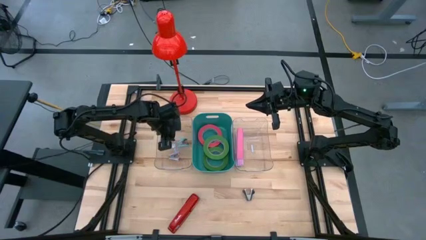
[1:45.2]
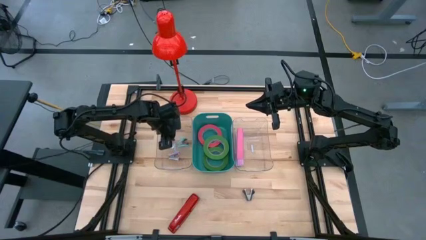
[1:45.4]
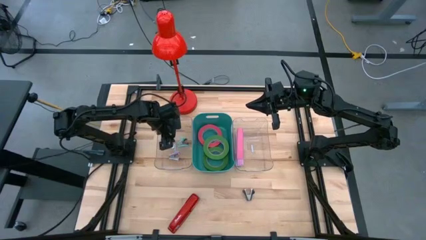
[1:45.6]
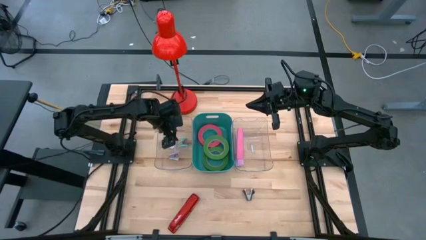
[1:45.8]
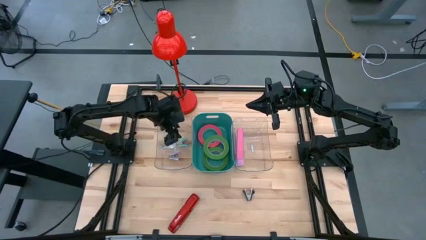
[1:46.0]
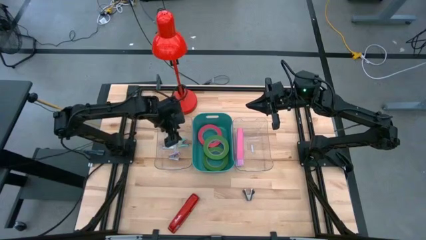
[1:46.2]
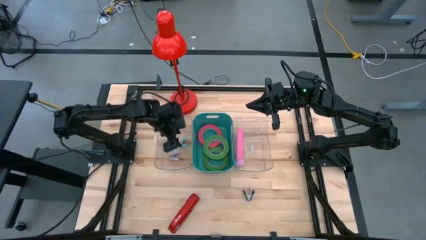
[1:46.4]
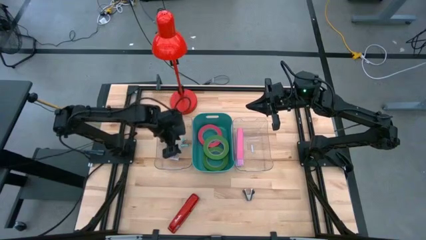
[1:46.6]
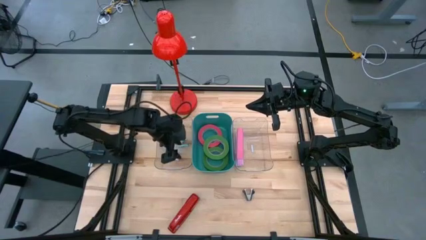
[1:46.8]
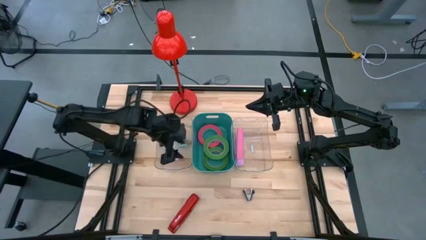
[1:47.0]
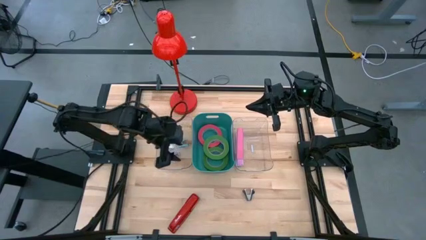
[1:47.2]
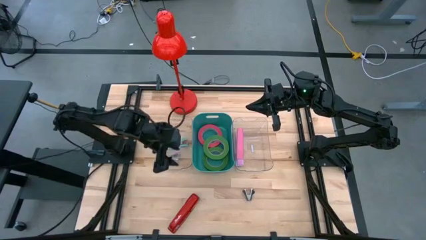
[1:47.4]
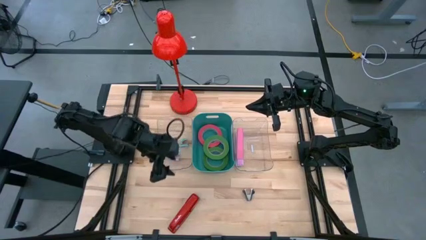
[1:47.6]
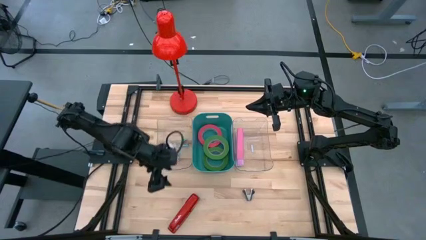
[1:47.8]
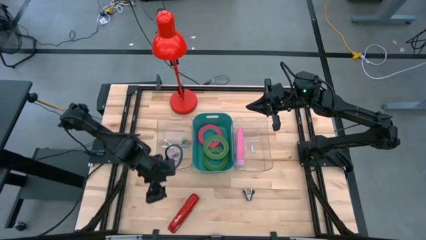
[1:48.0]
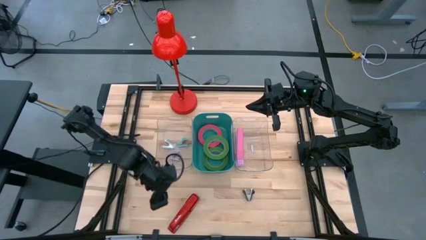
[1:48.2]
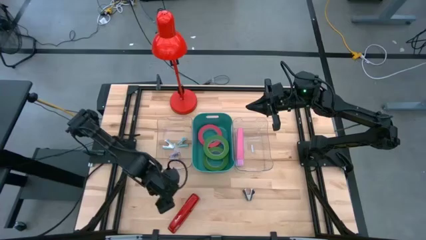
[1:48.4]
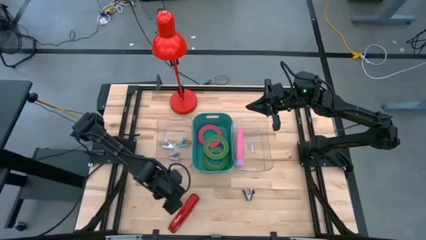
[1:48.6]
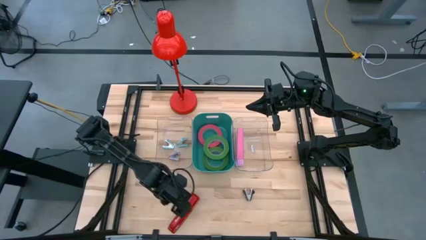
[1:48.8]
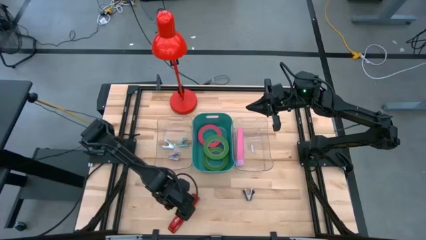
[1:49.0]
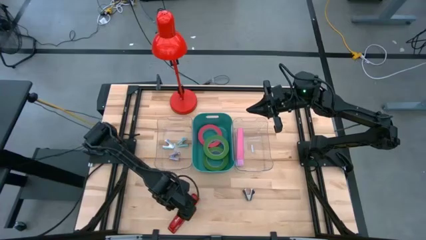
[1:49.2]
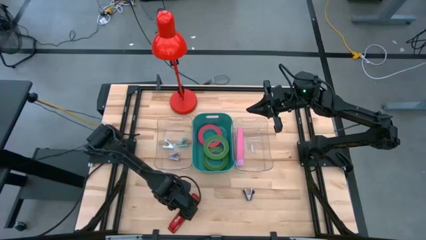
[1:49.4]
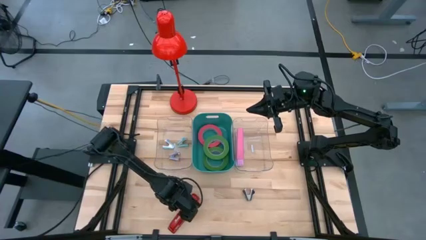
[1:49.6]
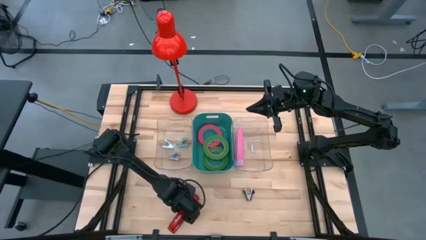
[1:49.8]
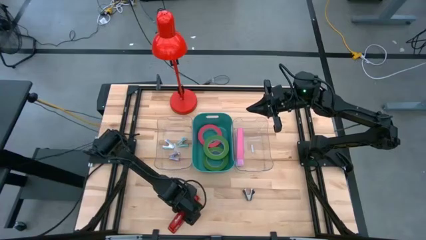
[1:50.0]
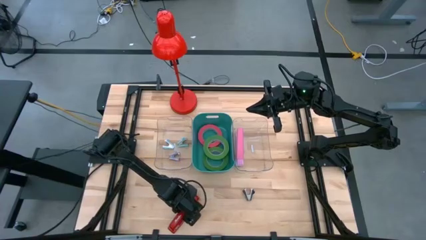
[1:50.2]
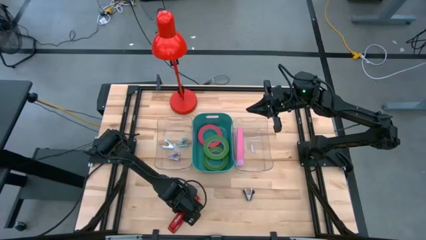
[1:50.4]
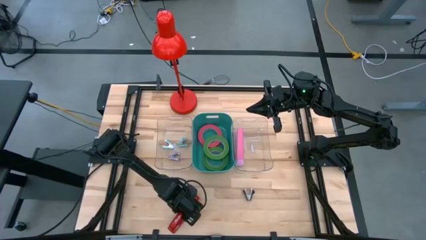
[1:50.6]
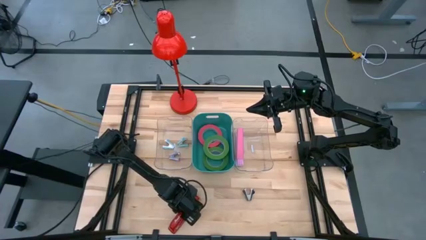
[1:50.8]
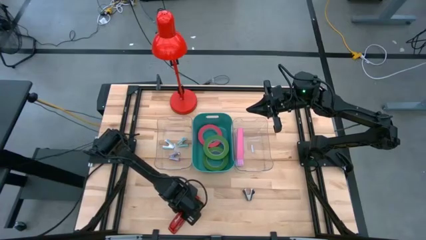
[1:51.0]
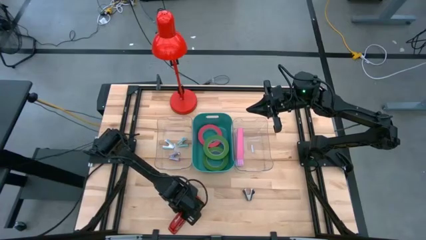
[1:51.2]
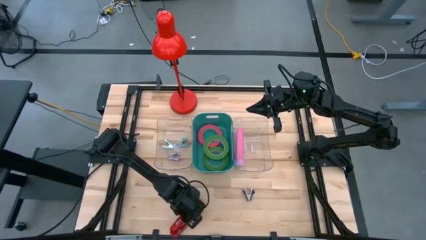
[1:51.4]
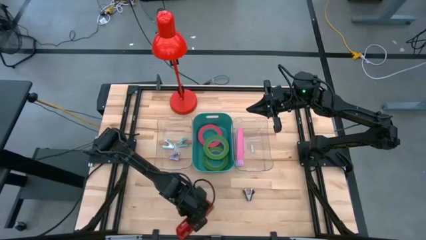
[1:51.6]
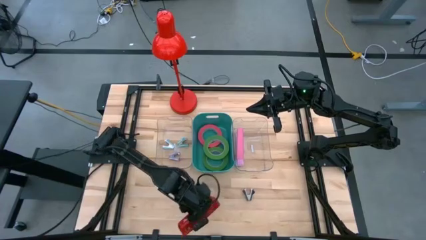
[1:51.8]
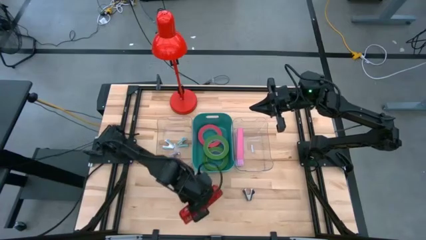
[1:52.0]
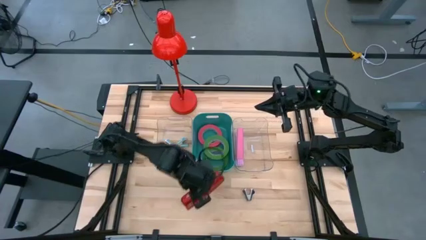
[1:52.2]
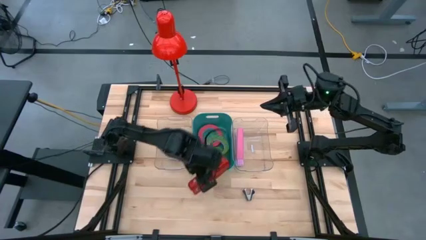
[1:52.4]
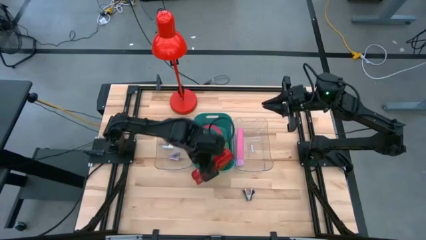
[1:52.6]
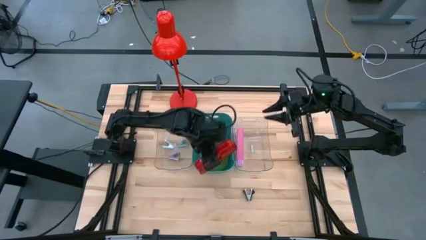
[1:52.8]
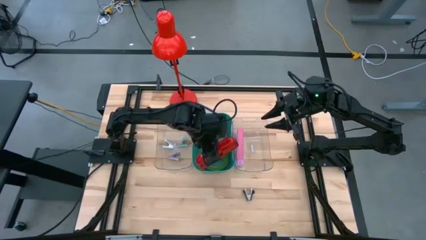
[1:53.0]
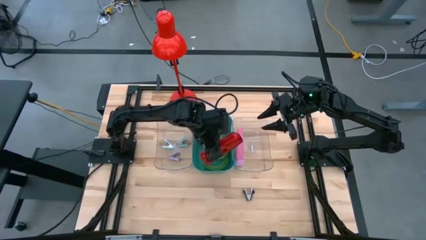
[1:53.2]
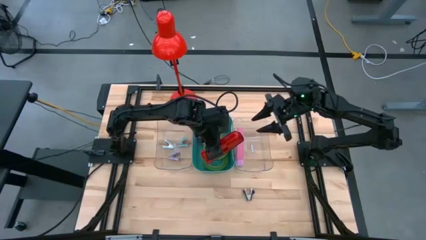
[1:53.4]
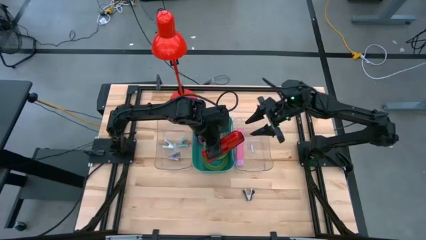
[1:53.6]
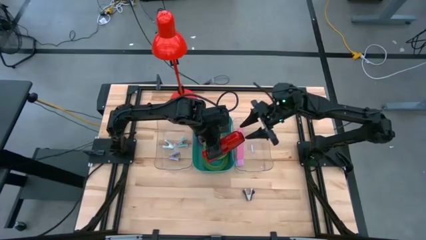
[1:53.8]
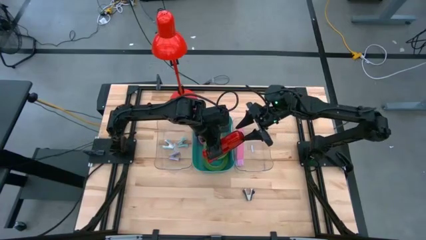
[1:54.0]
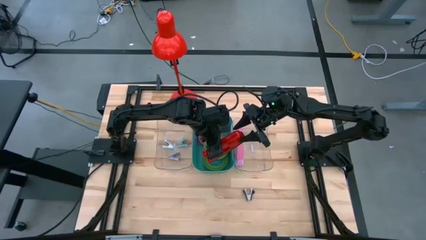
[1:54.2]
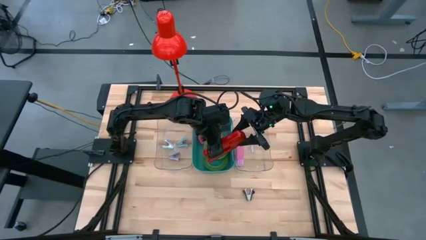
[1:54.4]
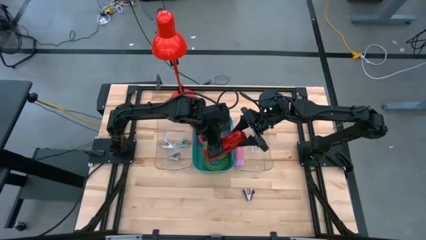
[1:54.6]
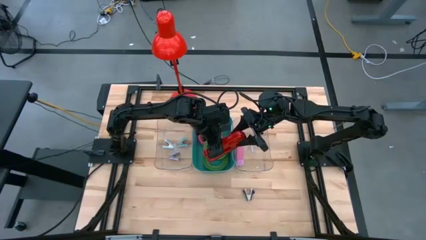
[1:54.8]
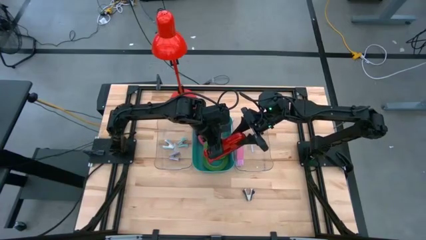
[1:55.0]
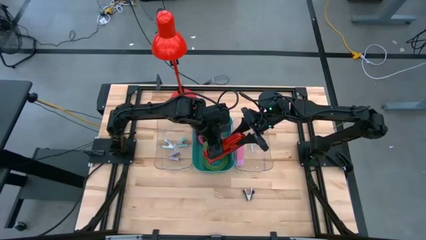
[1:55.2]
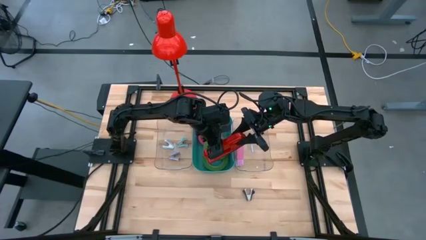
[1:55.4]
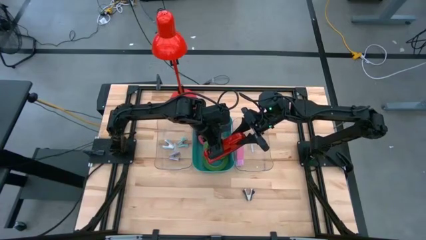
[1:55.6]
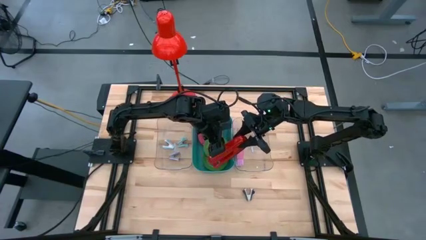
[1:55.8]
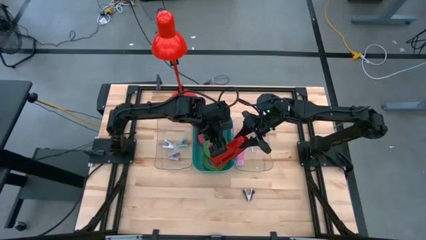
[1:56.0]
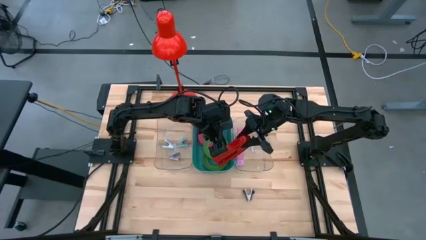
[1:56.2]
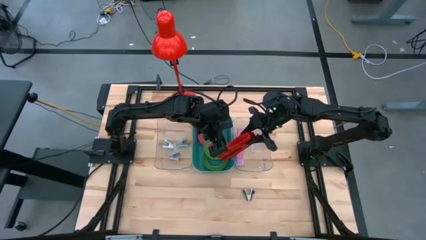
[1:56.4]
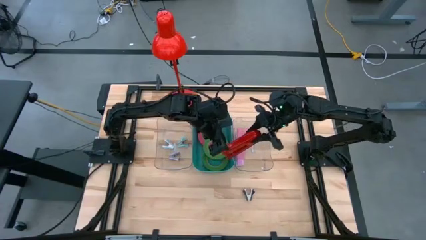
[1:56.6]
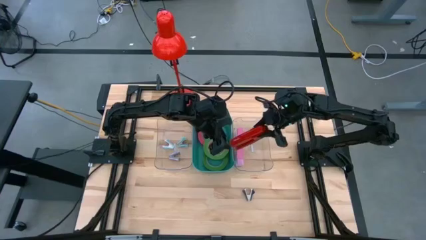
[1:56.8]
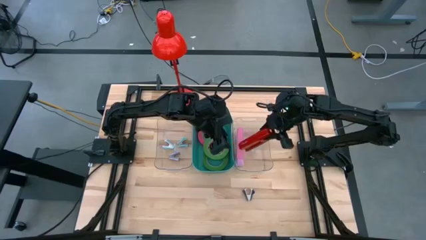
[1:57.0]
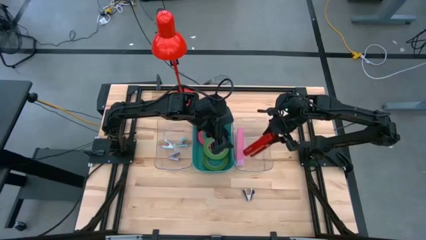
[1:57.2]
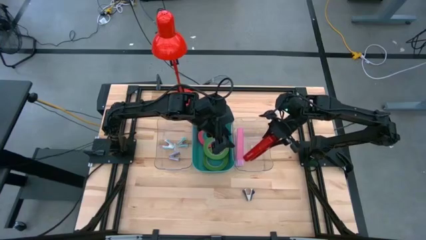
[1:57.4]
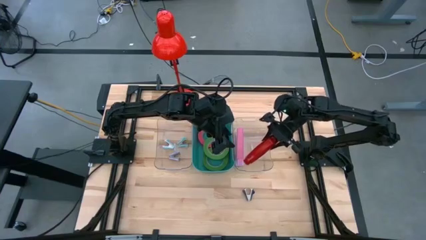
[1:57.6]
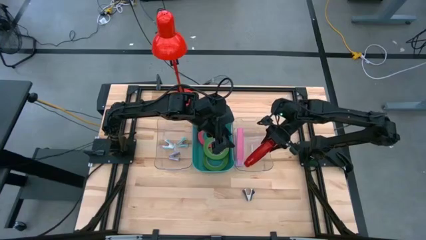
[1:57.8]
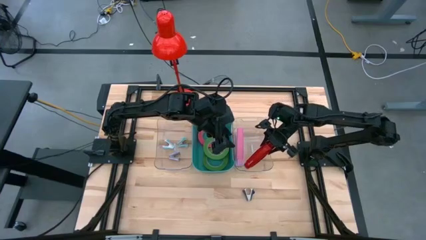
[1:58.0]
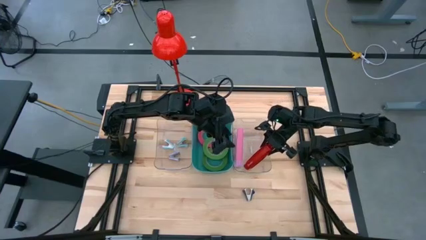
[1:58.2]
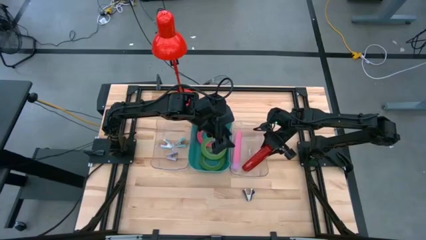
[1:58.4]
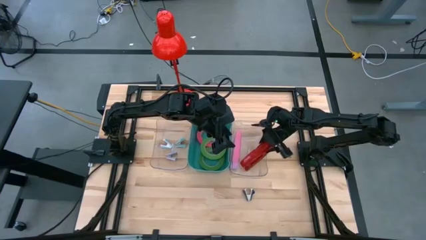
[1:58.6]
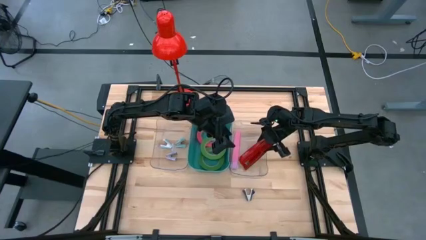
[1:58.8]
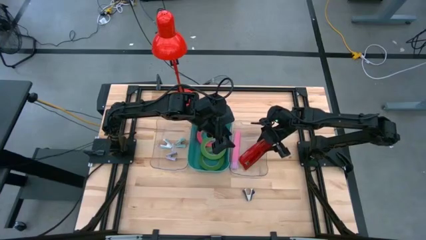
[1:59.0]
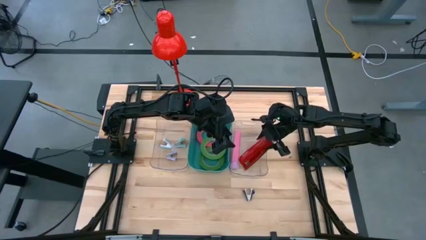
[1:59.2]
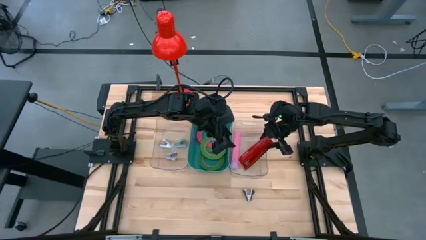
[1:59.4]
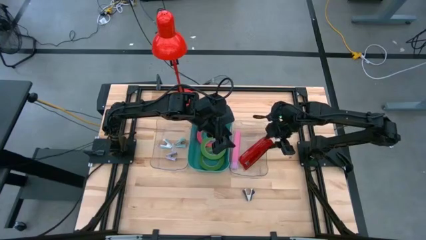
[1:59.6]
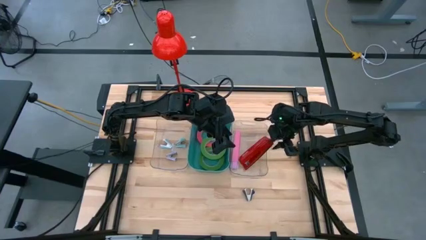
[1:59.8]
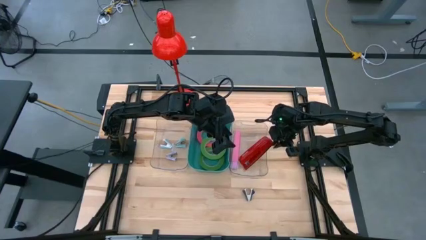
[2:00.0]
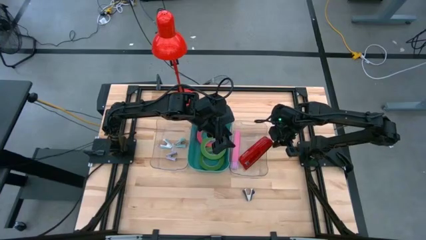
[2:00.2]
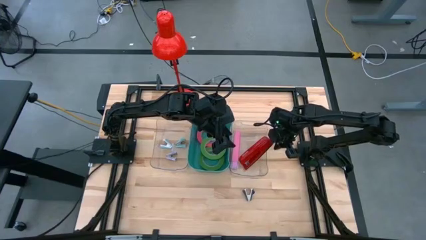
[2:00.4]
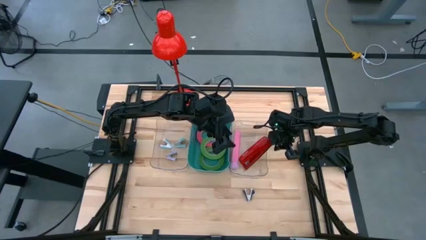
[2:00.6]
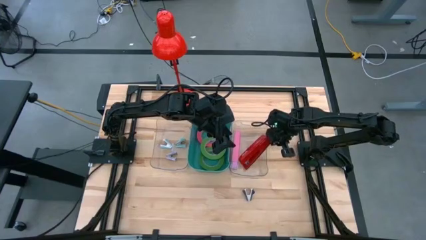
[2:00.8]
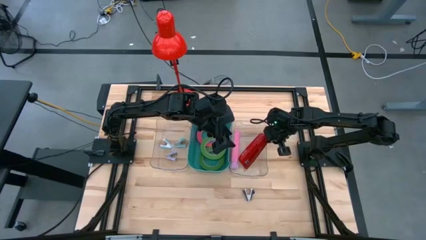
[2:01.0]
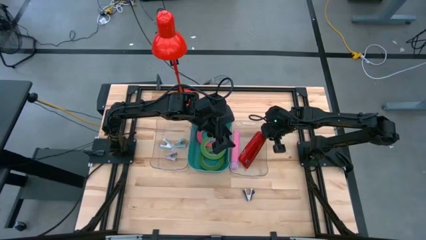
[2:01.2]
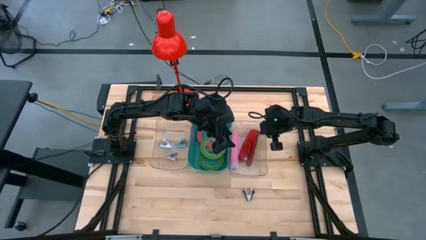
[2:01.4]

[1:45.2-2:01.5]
Task: Pick and place Stapler, Stapler remover, tape
Put the red stapler into the right transparent bin
